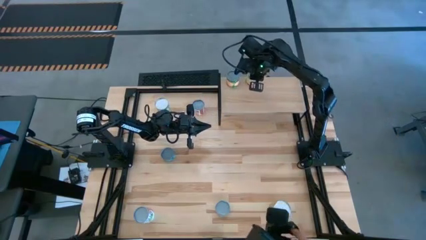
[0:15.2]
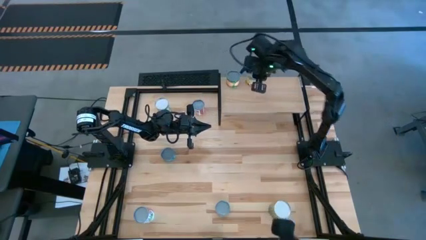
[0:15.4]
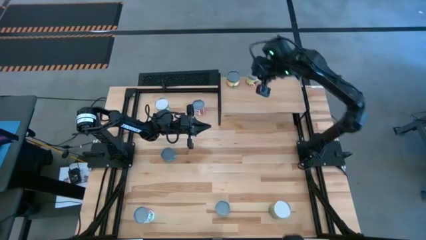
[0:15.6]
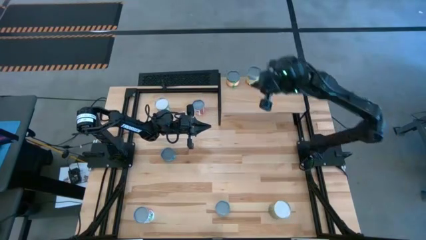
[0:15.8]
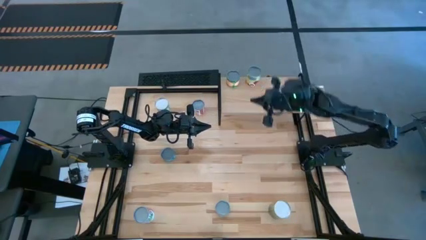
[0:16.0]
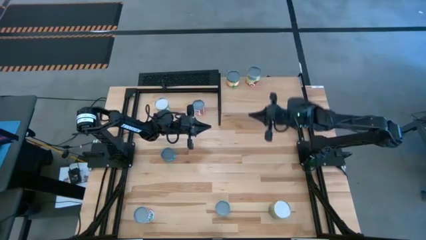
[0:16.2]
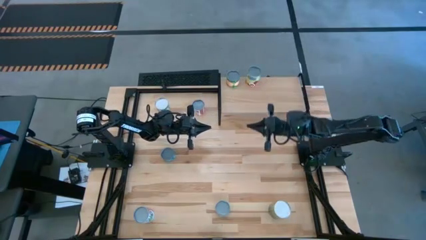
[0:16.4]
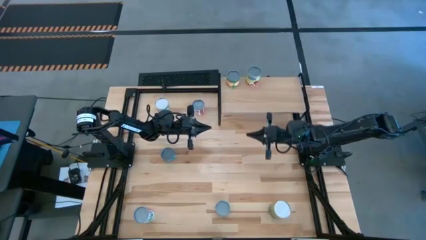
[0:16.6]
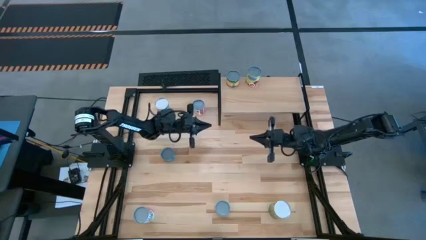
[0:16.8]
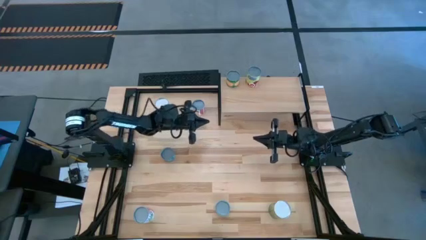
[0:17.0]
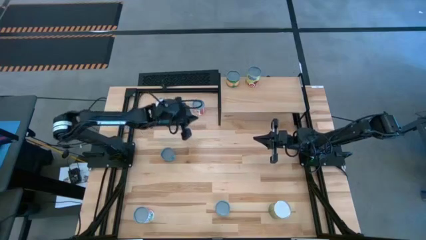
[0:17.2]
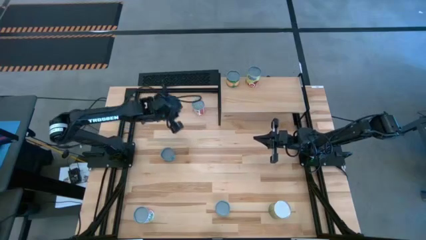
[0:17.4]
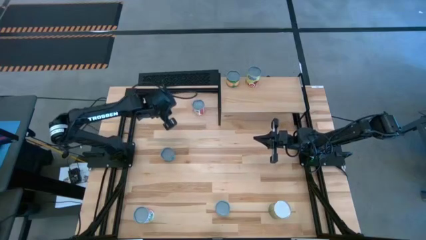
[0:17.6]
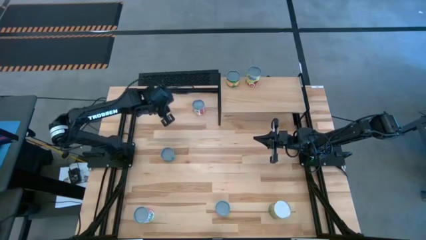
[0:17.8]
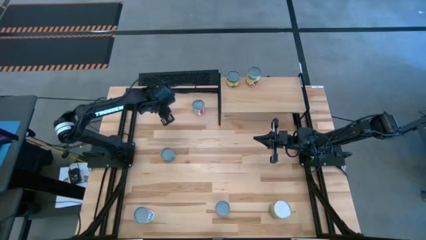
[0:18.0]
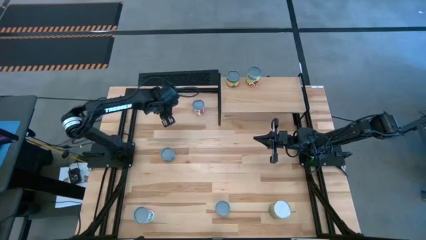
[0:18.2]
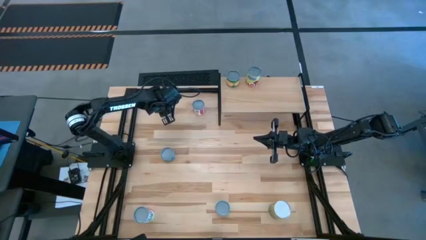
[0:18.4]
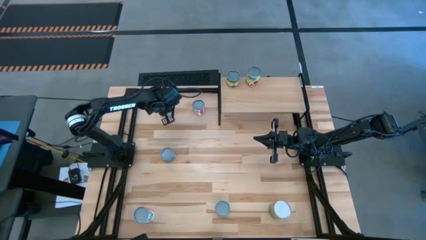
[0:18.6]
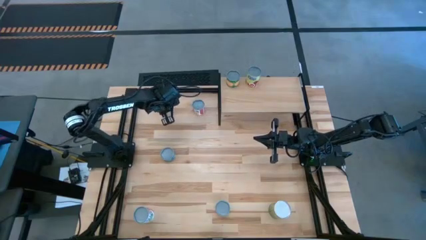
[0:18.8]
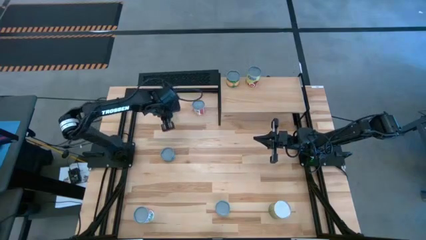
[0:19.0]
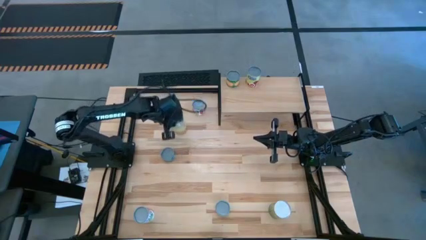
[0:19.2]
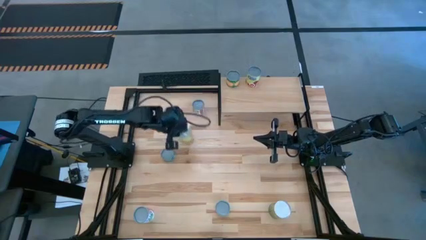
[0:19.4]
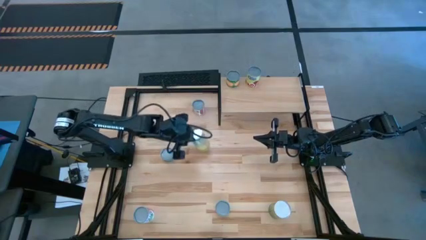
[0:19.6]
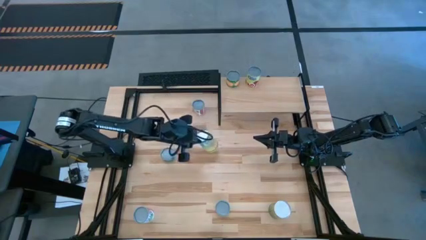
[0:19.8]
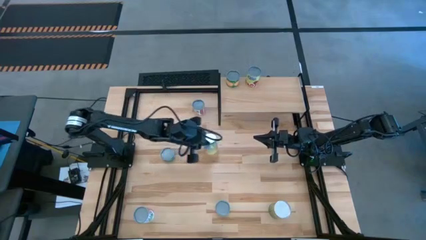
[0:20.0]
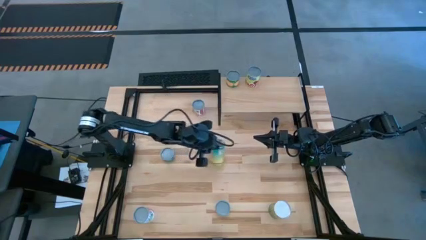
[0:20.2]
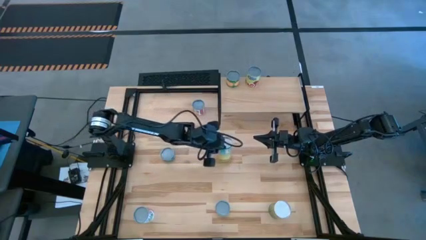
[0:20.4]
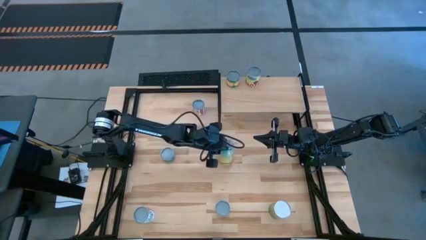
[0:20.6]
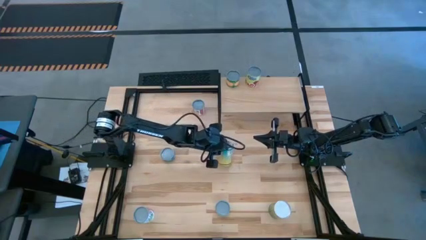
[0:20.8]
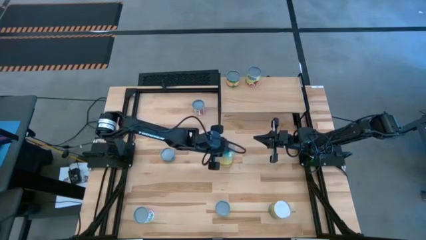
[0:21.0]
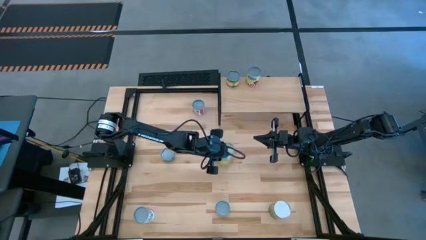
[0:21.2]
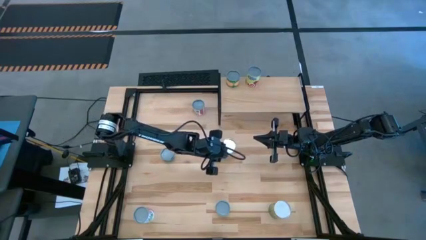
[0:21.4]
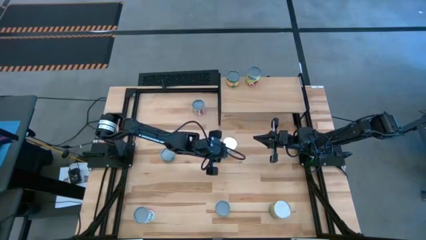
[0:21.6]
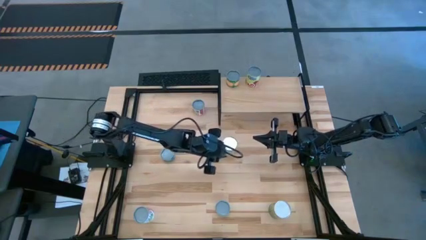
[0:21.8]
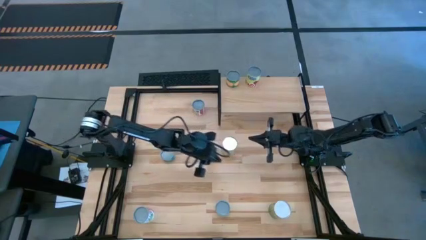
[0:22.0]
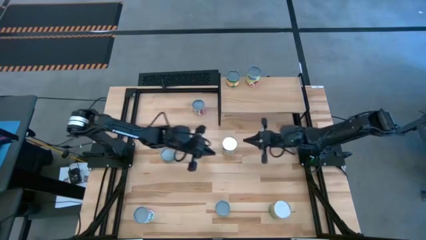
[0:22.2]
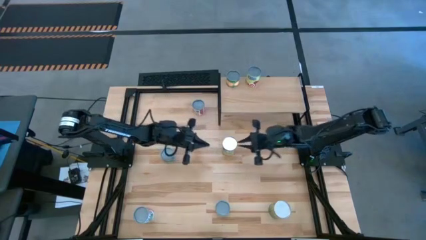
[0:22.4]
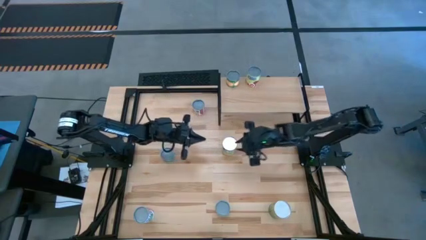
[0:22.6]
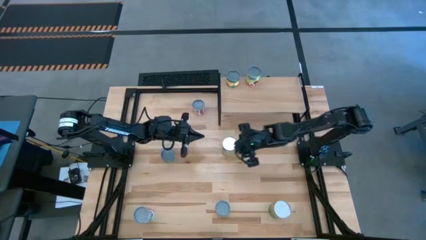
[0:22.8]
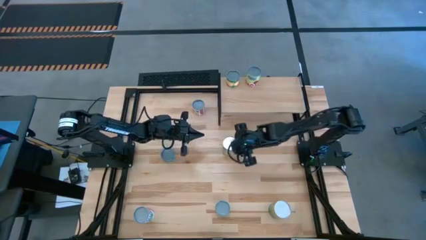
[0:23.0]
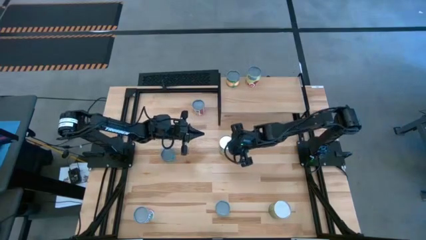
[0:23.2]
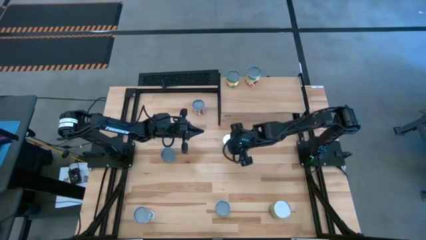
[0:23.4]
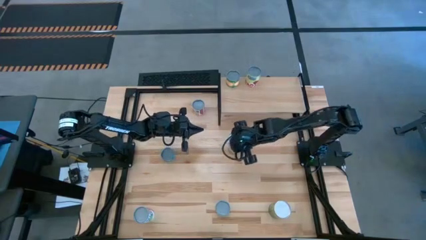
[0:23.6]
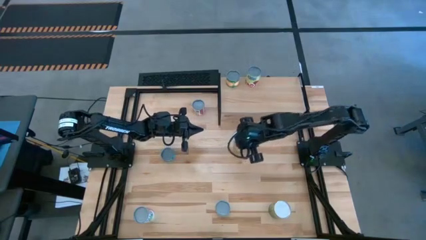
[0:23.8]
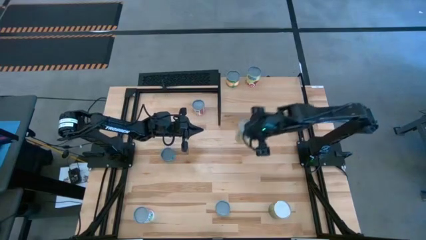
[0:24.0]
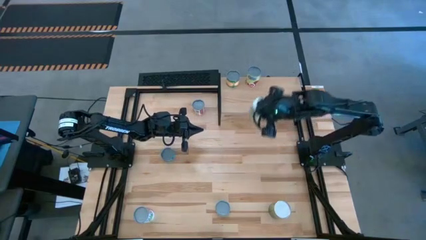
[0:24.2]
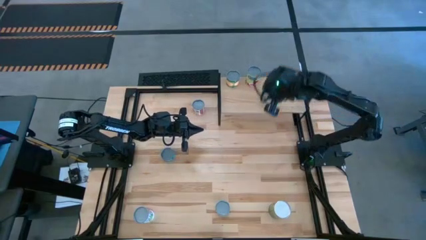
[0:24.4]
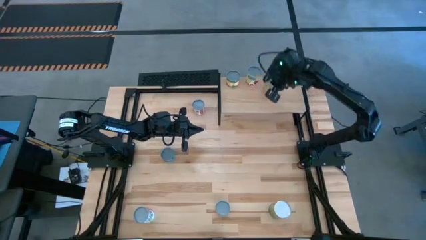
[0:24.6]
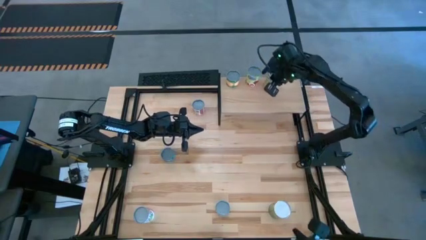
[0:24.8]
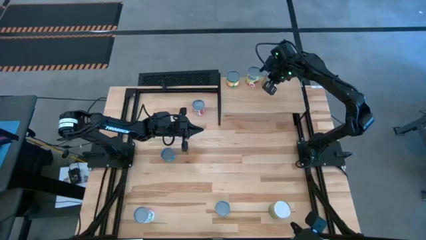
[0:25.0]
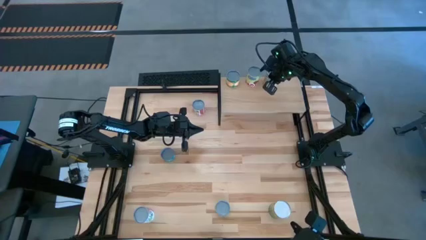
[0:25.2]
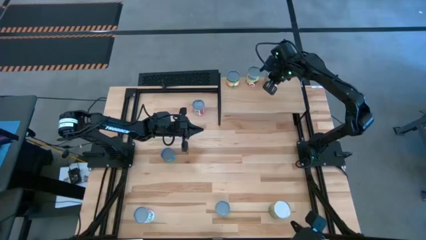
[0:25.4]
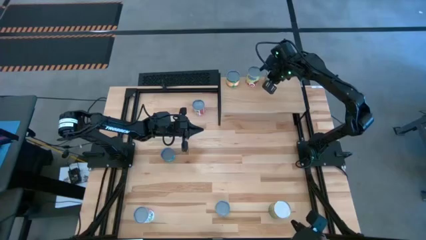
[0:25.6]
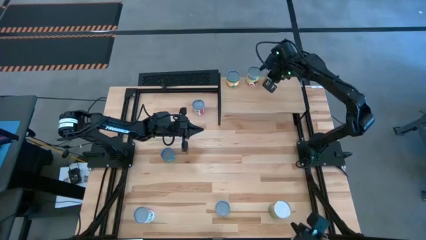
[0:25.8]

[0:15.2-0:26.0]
Task: Pick and place cans onto a shelf
Put the canned carrots on the shelf

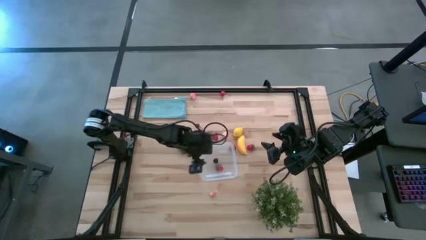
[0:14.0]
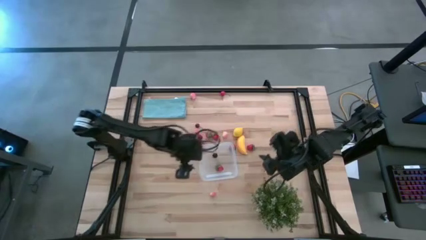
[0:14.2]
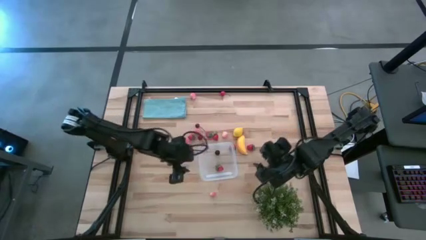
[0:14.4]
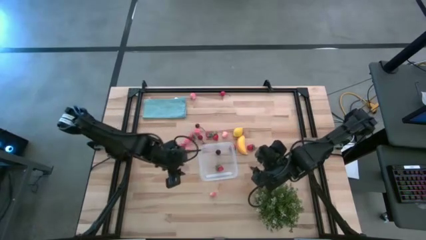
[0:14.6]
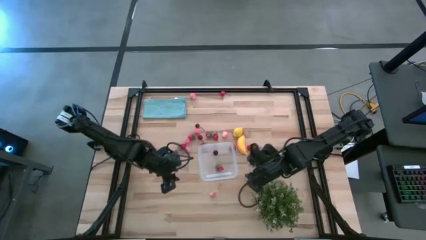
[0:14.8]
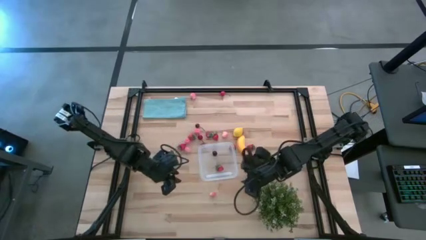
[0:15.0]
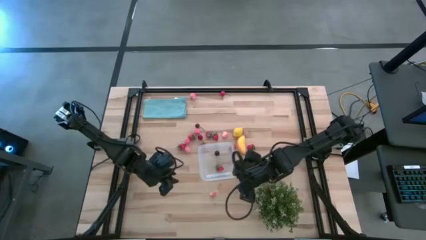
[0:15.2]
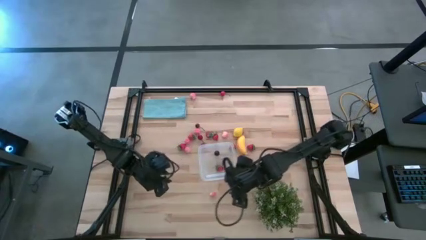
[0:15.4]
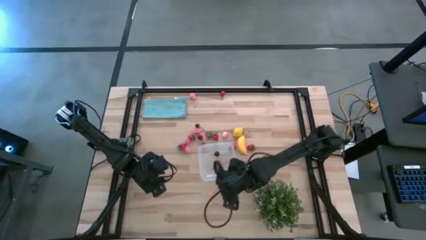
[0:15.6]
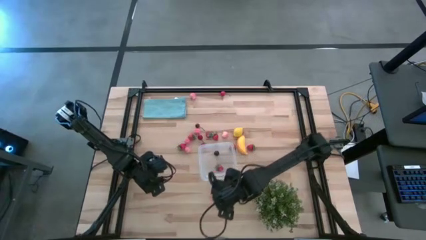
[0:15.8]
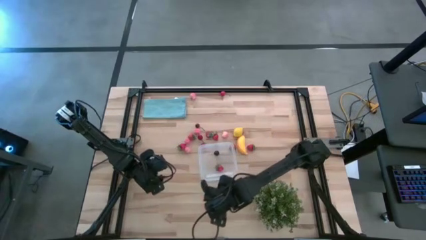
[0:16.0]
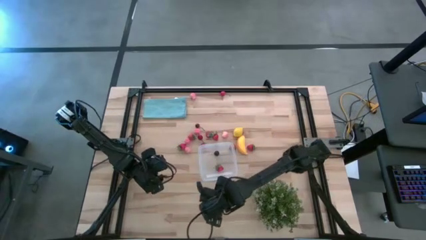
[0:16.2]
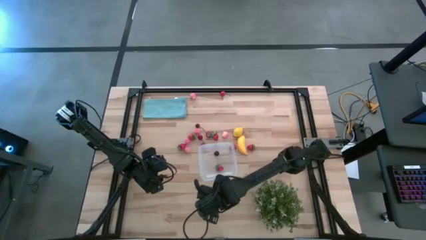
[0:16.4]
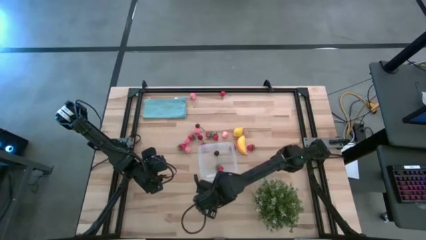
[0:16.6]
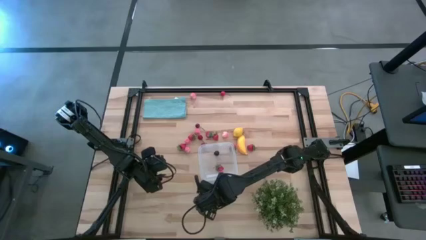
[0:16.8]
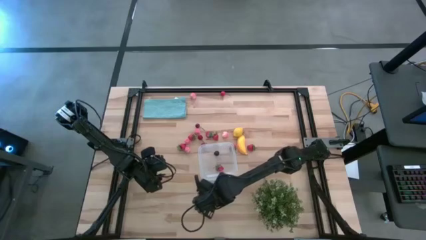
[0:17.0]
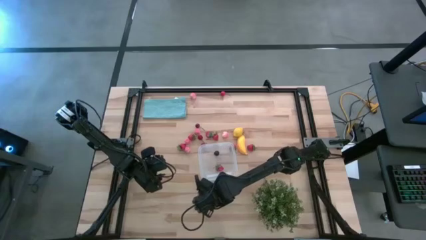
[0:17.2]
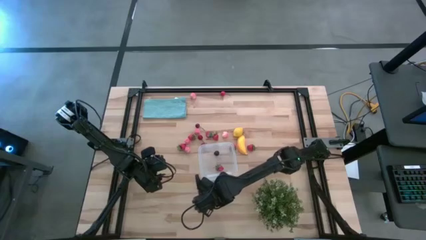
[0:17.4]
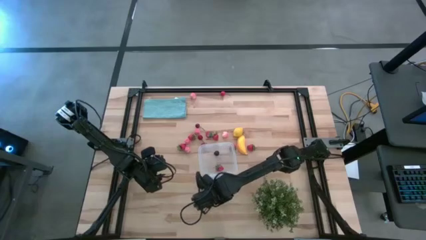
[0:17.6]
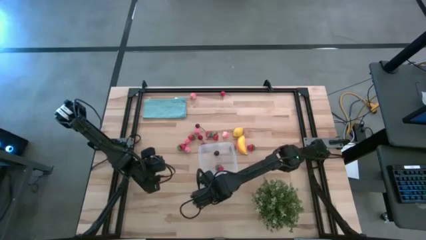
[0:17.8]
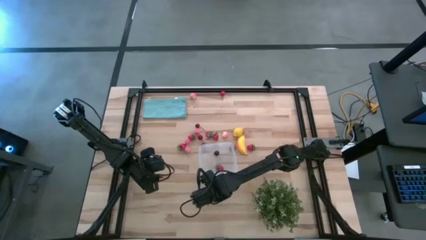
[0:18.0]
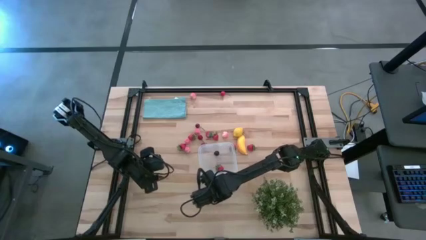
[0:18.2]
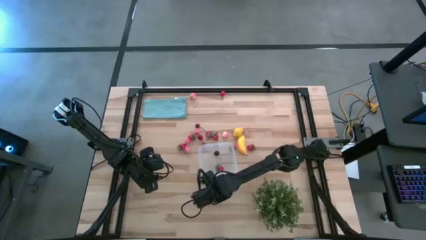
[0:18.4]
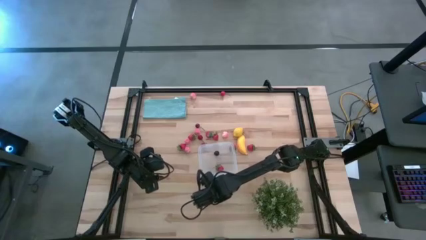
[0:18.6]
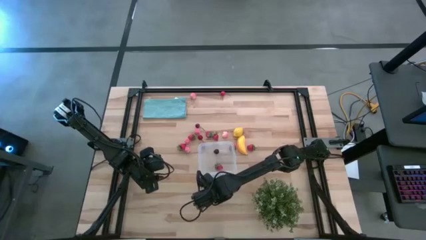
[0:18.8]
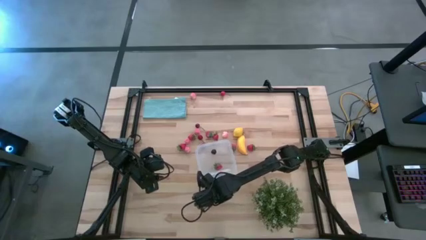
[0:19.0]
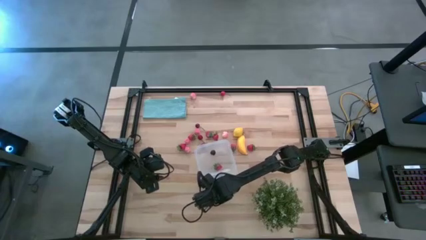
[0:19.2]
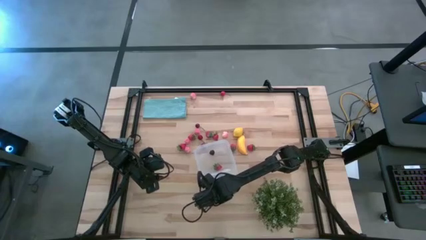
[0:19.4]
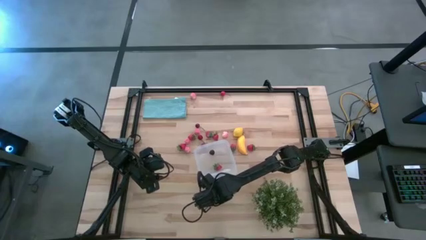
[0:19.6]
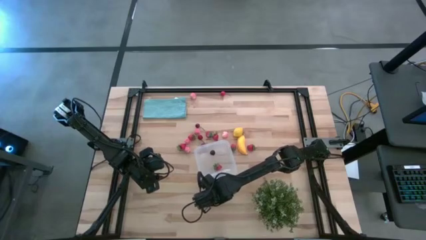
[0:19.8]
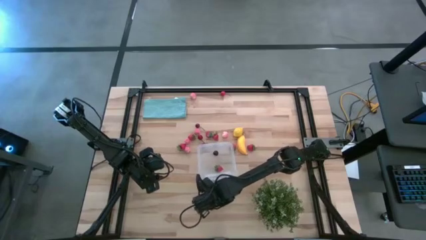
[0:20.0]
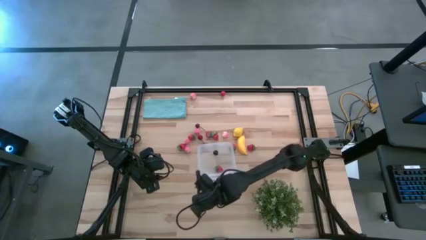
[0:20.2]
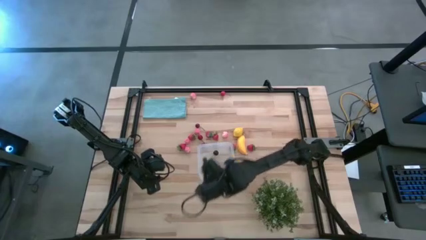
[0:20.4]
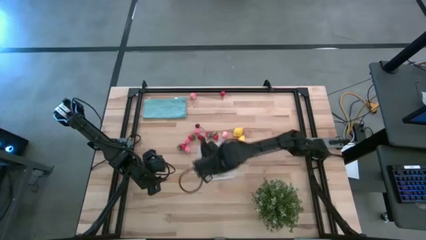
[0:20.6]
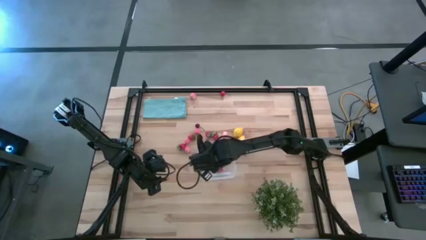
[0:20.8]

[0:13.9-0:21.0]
Task: Pick and placing Produce into tupperware
Put the pink peach into the transparent bin
